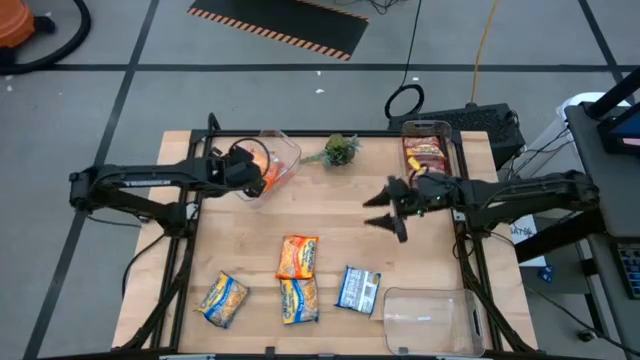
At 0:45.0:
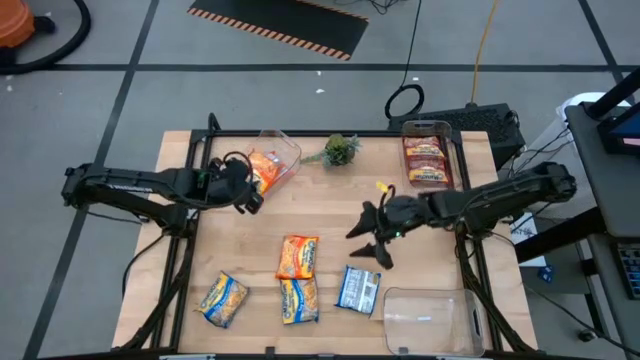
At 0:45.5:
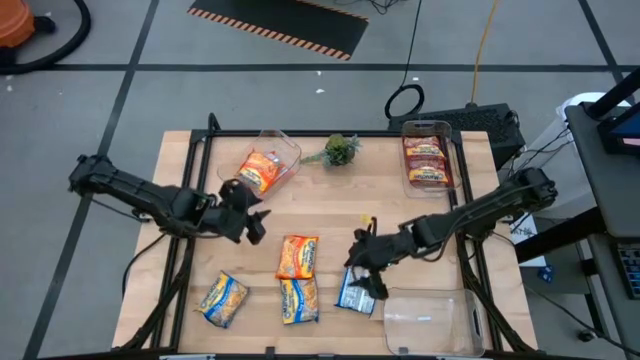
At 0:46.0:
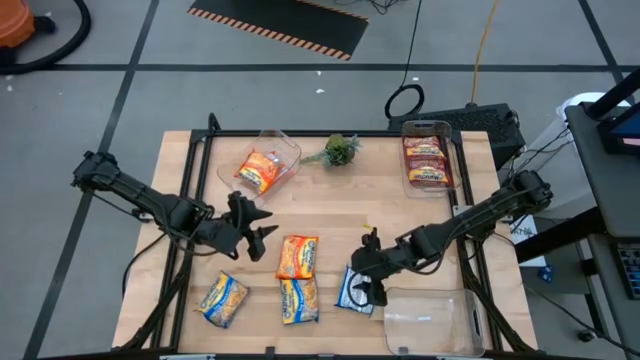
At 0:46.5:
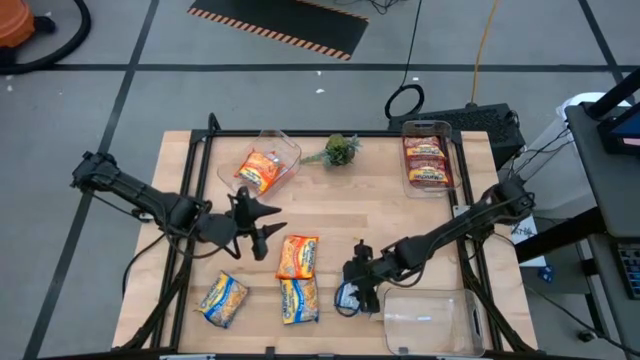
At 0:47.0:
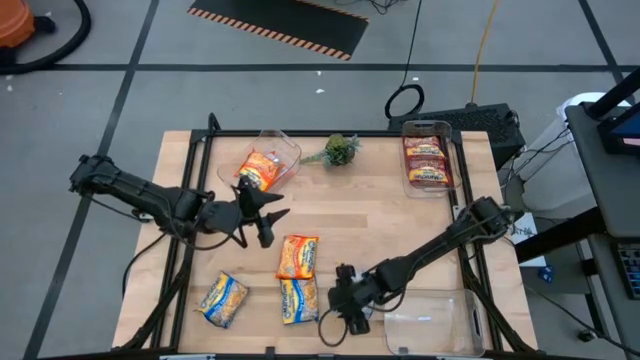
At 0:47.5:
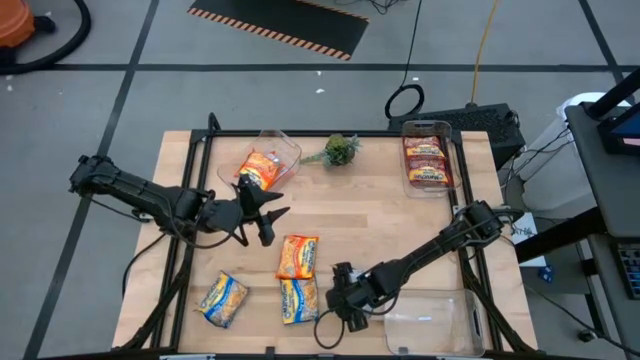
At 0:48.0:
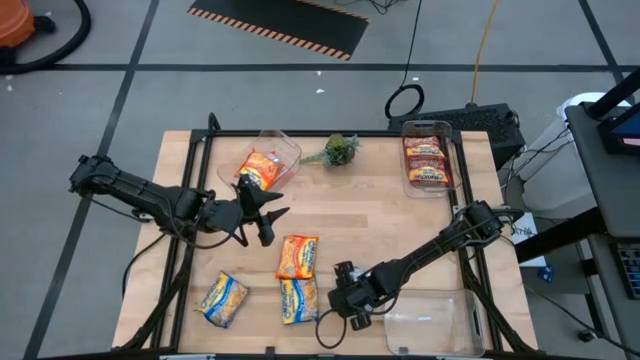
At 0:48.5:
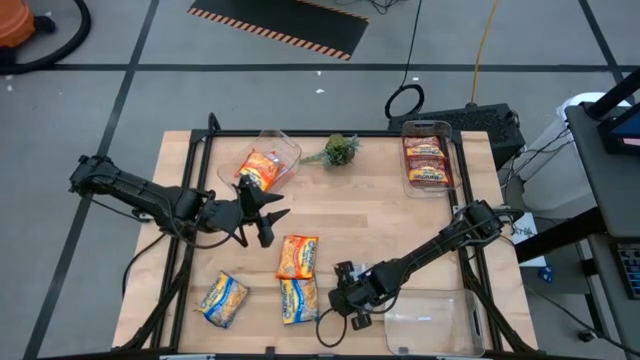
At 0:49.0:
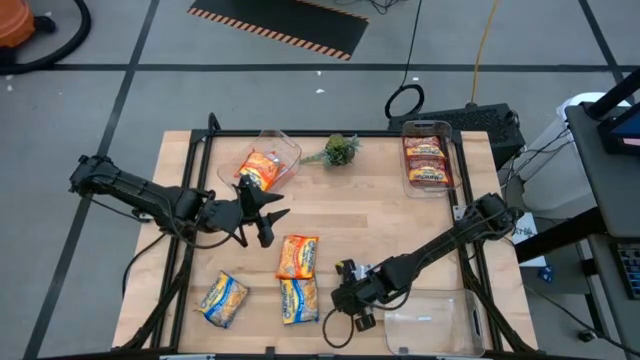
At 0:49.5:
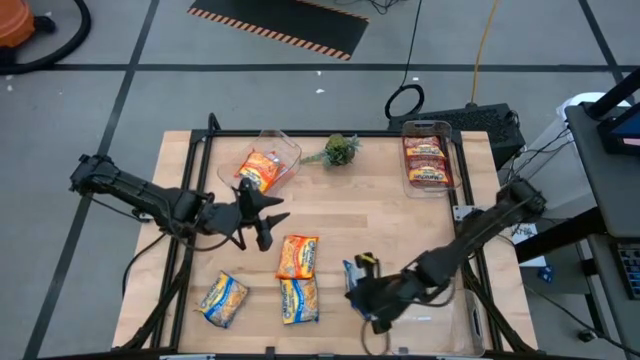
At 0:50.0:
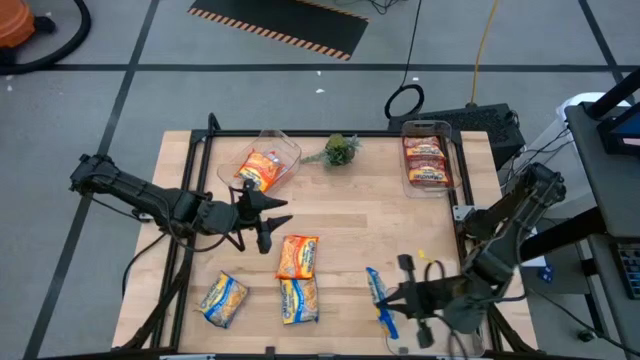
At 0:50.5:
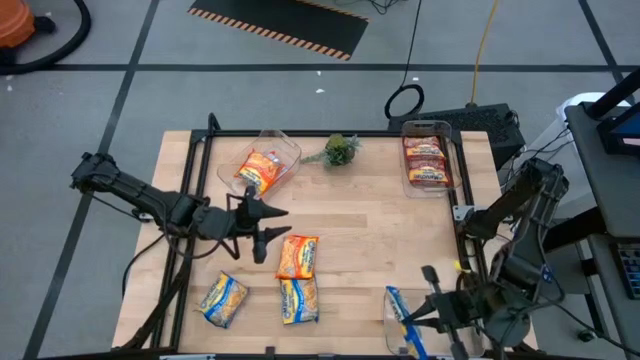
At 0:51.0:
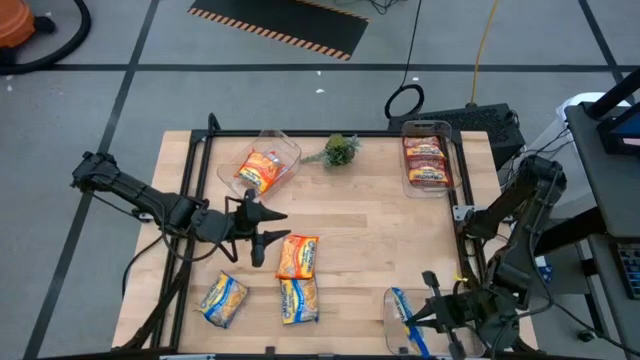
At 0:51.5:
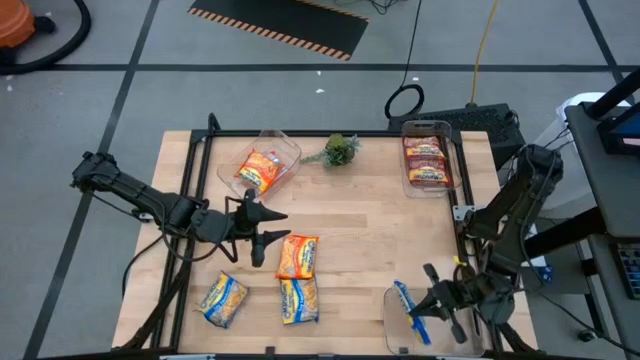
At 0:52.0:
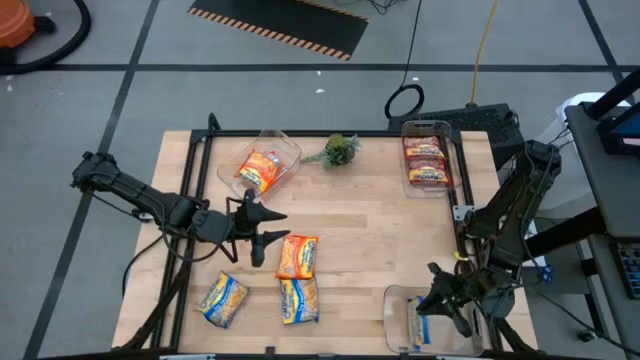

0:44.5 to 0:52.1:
Task: Sort Maruchan noodles
Put the right blue noodle pack into the bottom transparent bin

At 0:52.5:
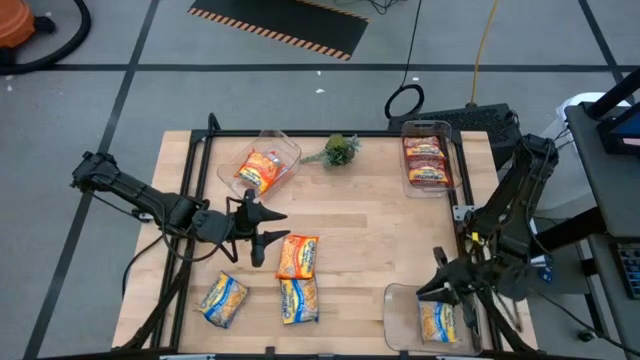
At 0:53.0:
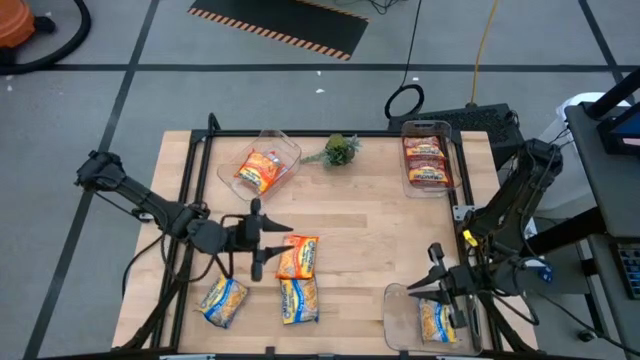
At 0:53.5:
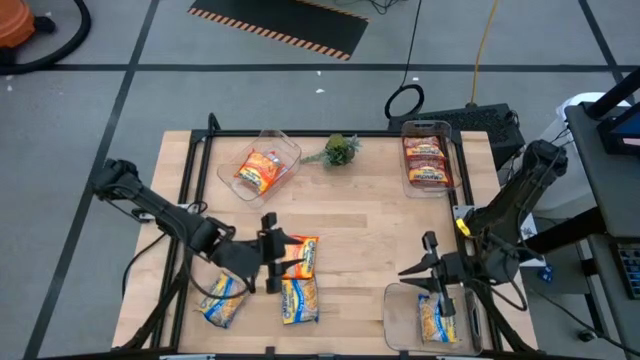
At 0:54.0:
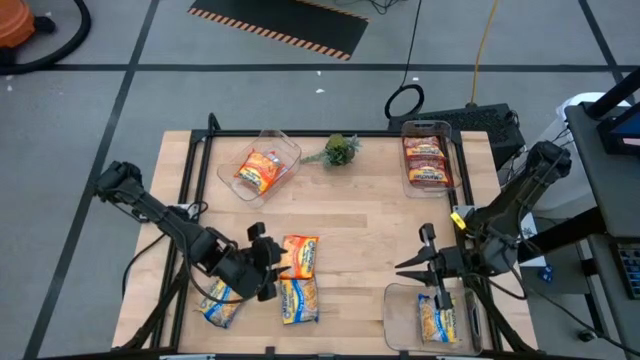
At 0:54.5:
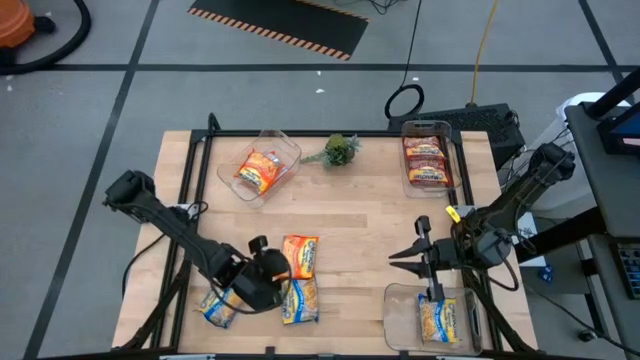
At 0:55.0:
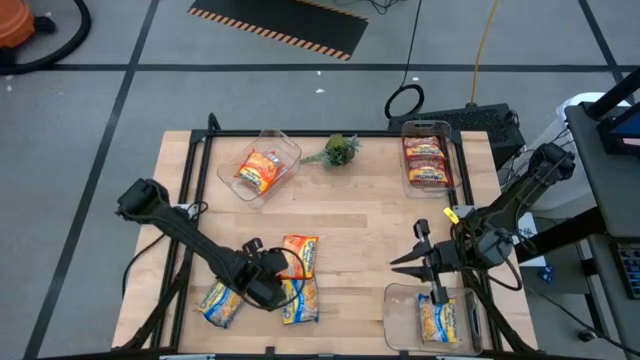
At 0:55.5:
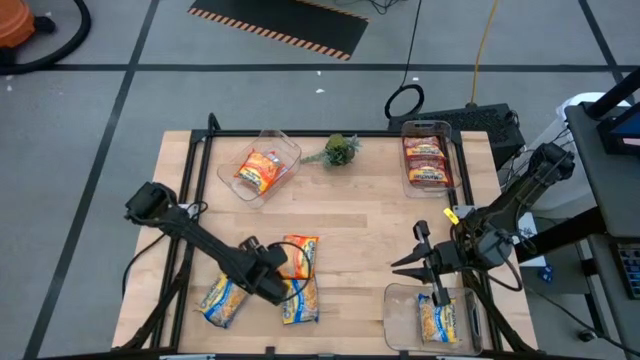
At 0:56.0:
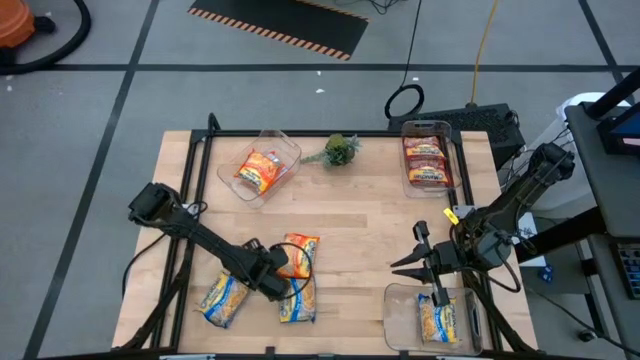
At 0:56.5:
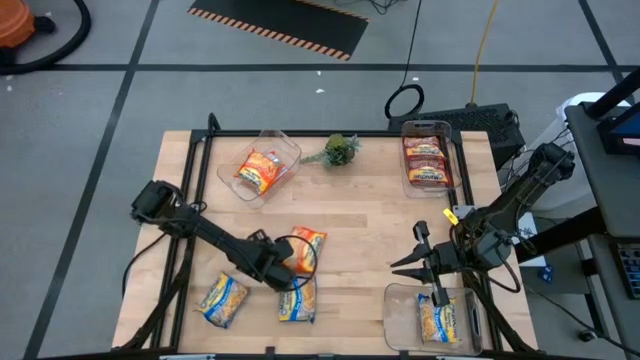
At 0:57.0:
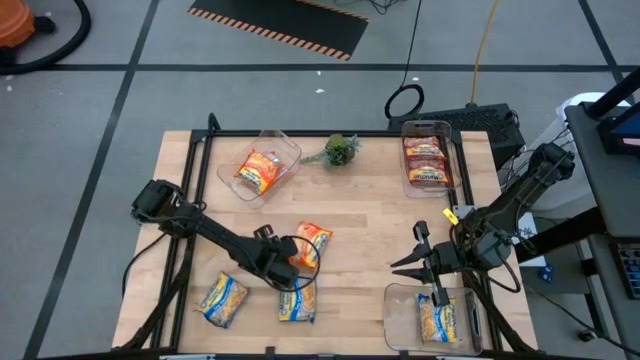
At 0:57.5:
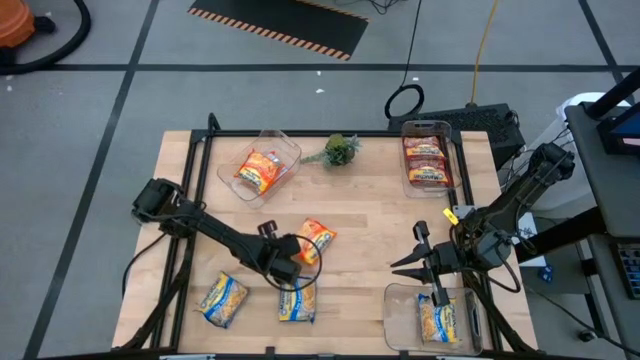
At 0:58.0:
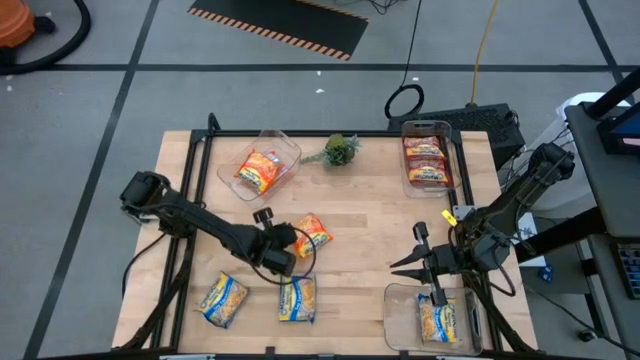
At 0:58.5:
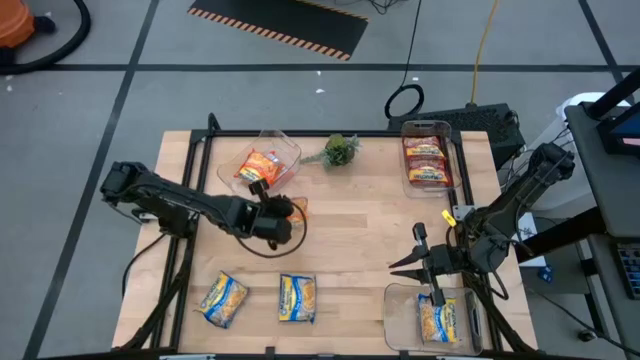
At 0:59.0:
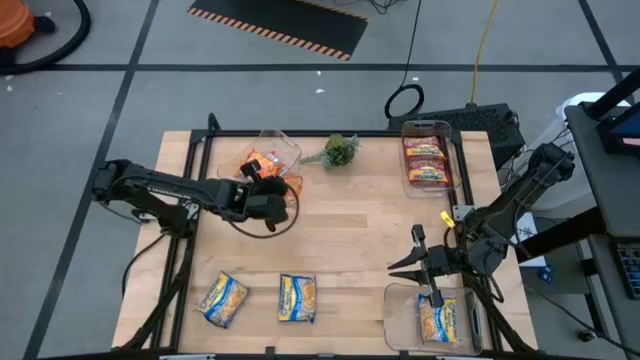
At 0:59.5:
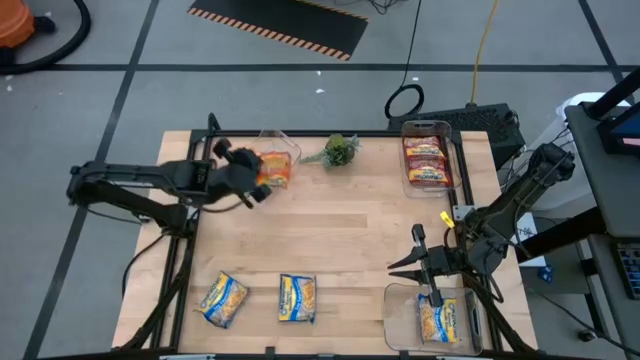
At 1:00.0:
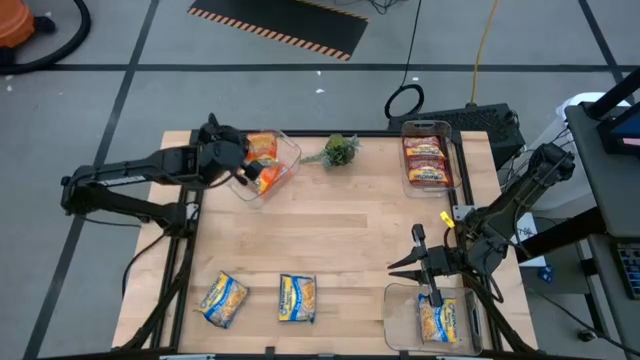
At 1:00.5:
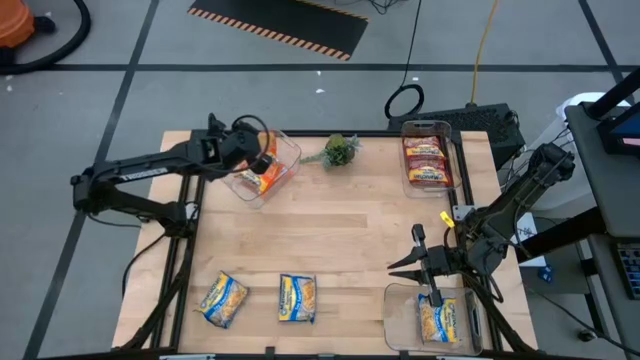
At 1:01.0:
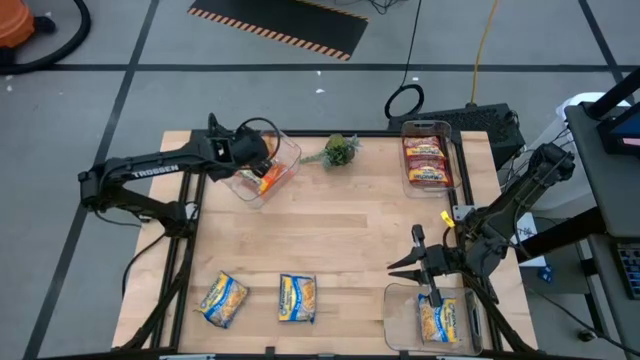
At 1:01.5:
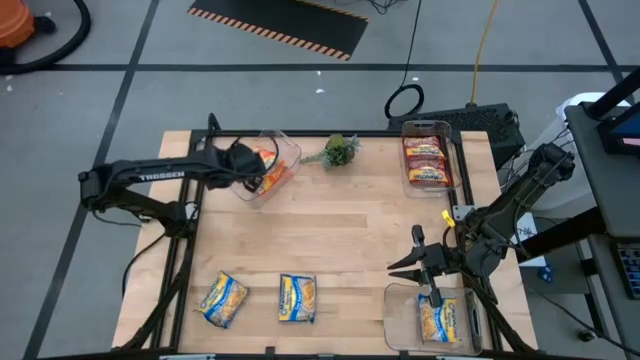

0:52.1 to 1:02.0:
Put the orange noodle pack into the top left transparent bin

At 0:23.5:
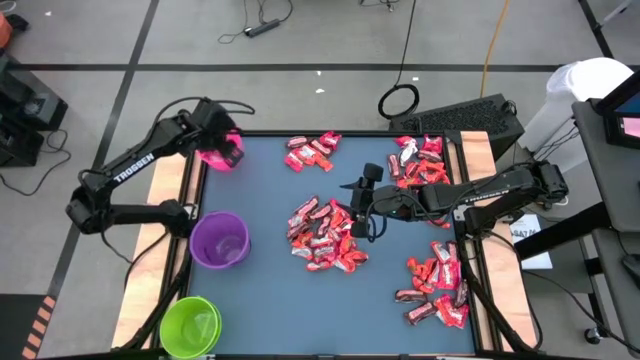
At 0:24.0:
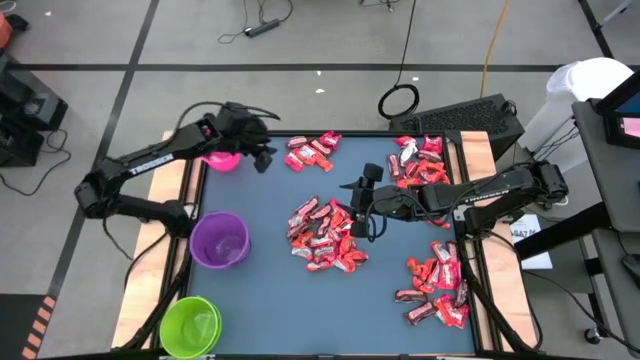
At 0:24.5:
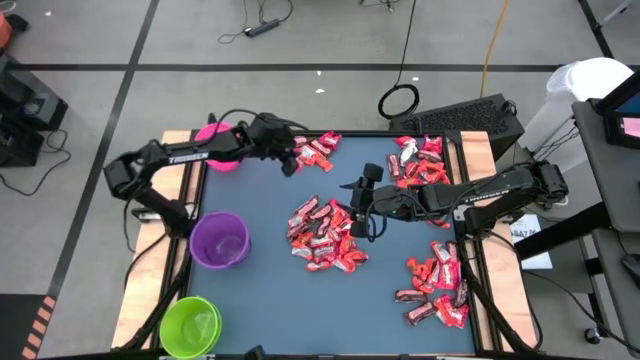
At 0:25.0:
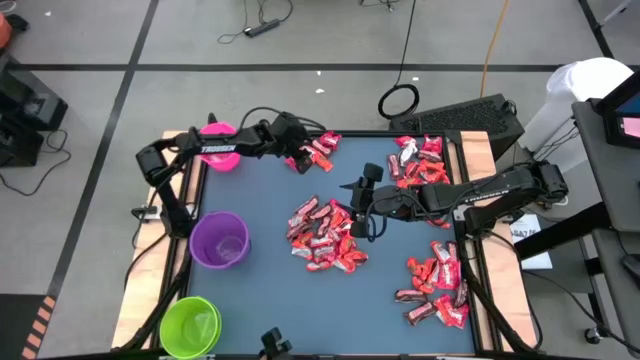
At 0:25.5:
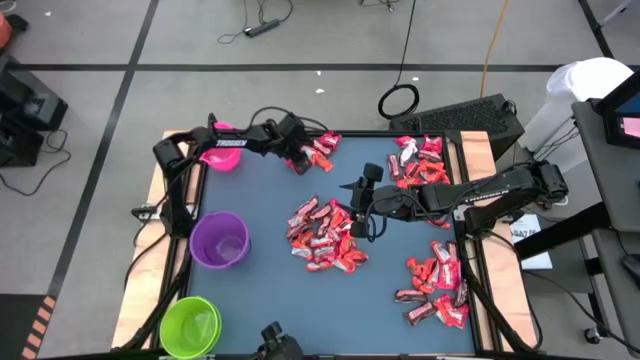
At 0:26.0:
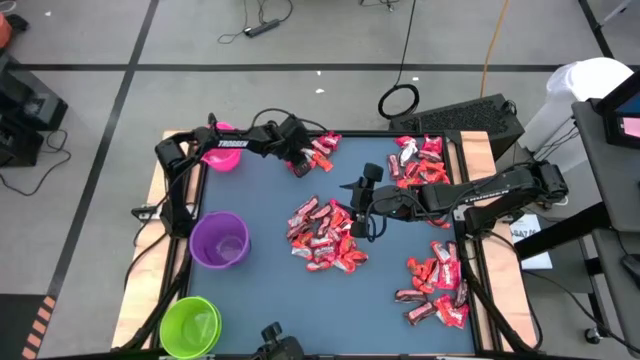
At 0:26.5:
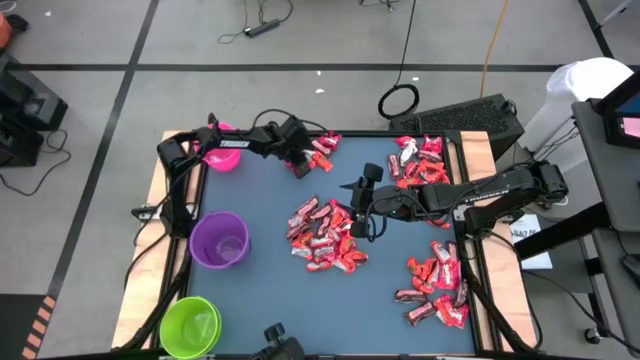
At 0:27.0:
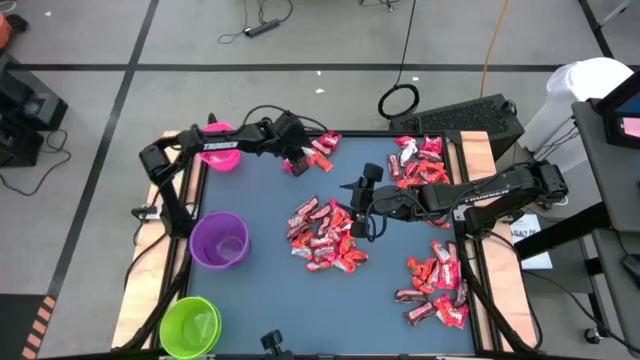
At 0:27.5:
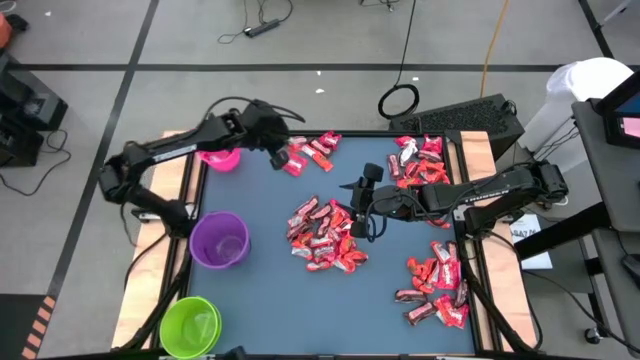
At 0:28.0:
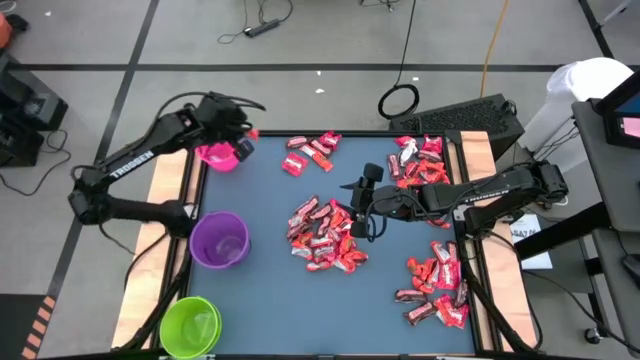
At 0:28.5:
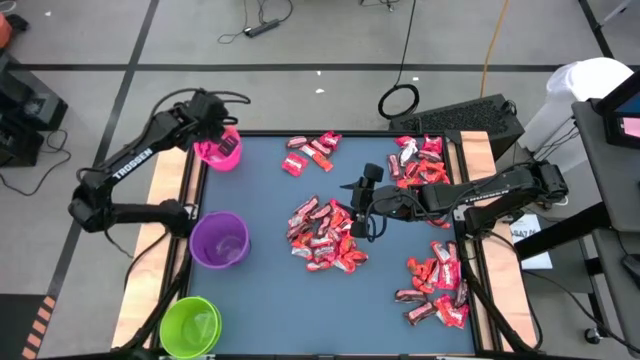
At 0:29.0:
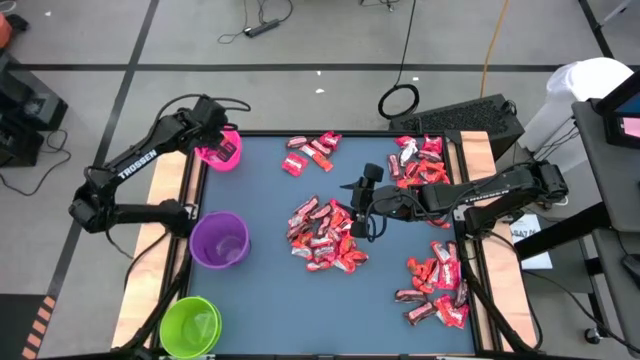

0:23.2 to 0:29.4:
Task: Organize candy in baskets
Put the orange chocolate into the pink bucket
